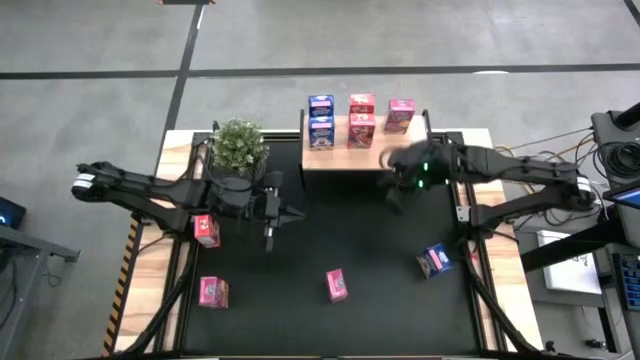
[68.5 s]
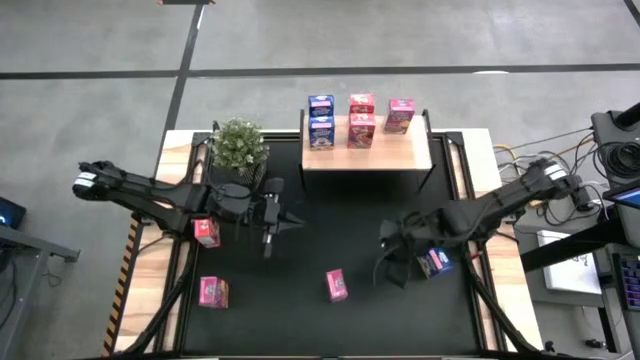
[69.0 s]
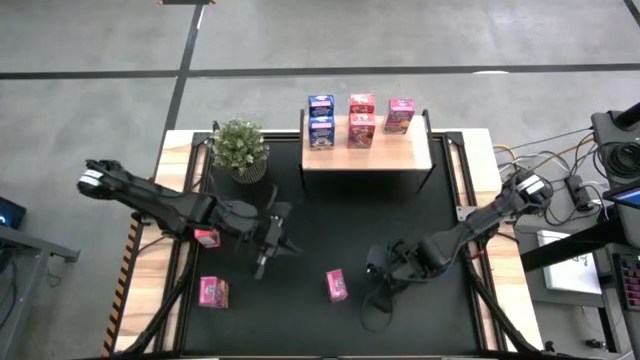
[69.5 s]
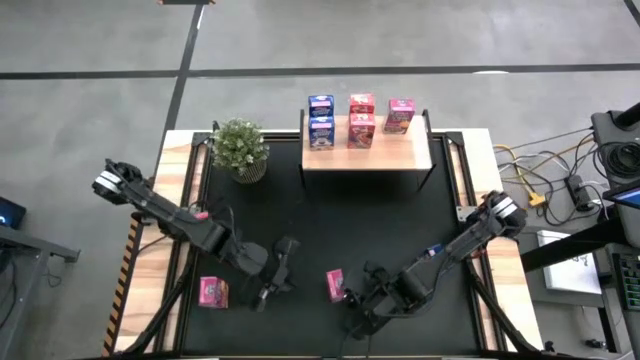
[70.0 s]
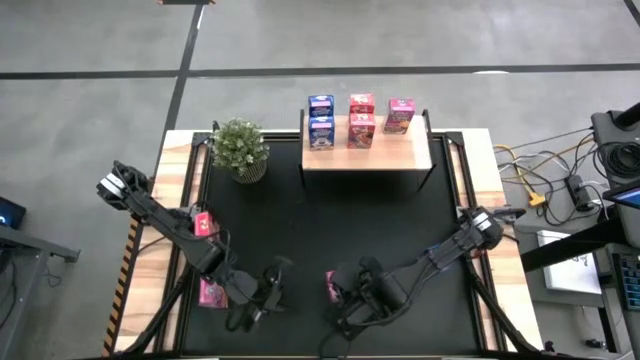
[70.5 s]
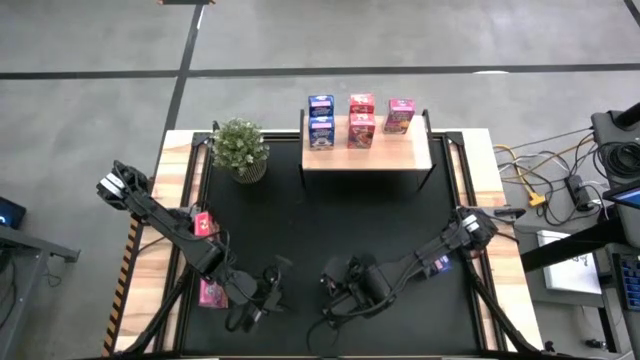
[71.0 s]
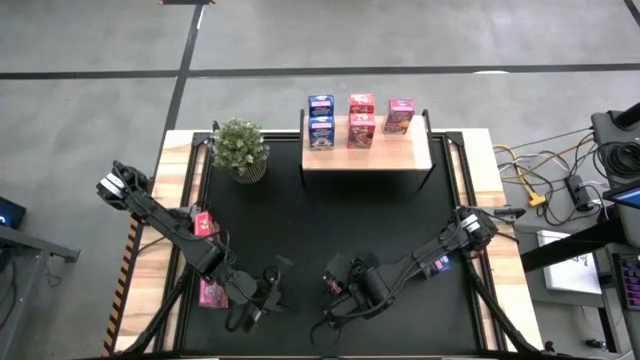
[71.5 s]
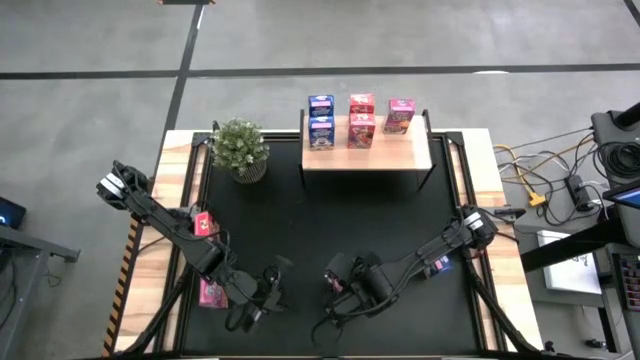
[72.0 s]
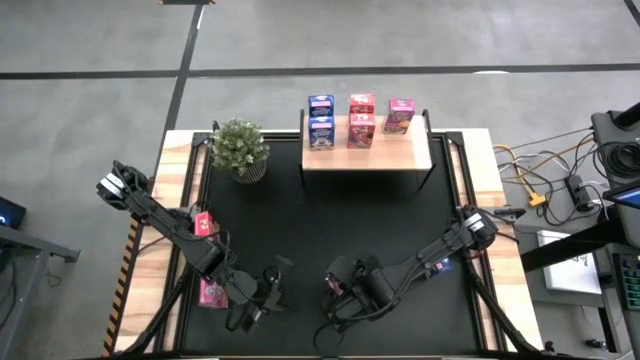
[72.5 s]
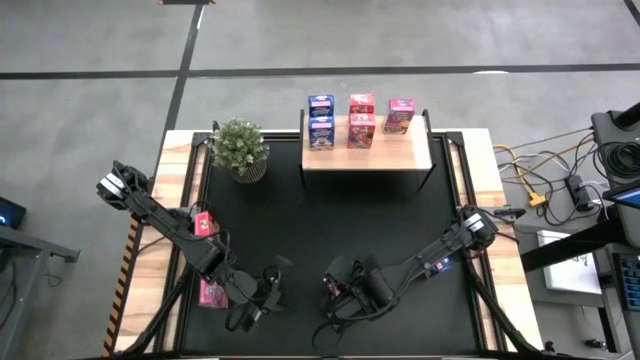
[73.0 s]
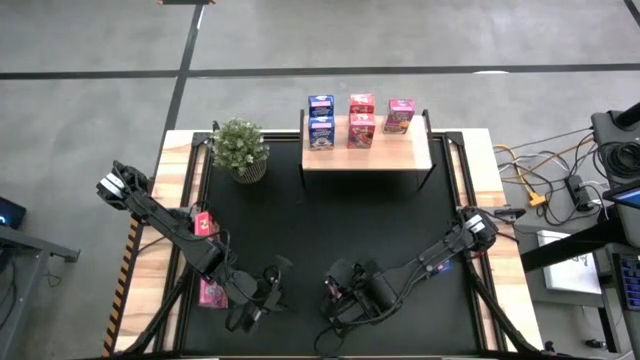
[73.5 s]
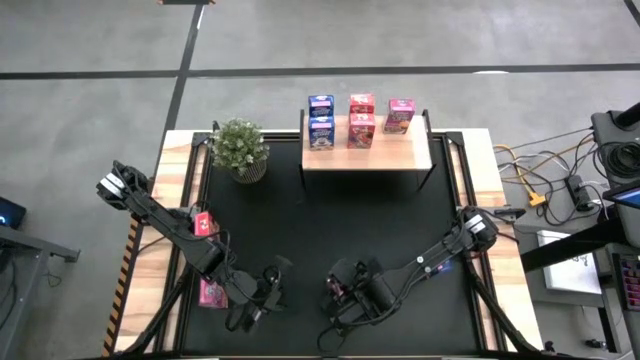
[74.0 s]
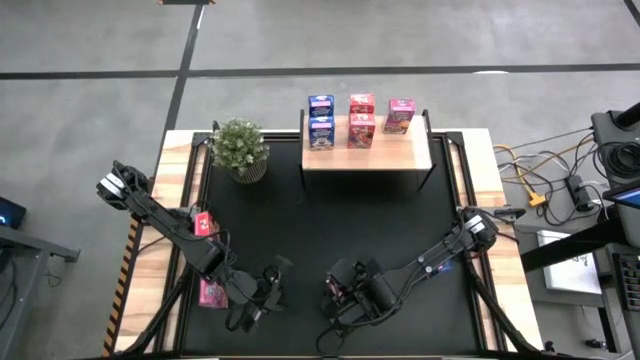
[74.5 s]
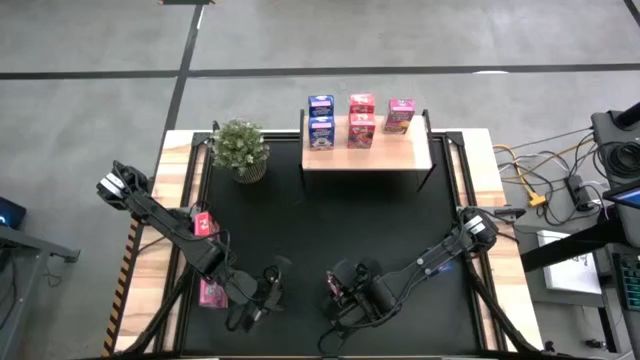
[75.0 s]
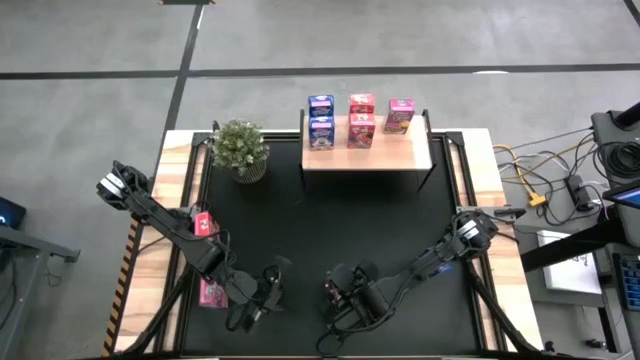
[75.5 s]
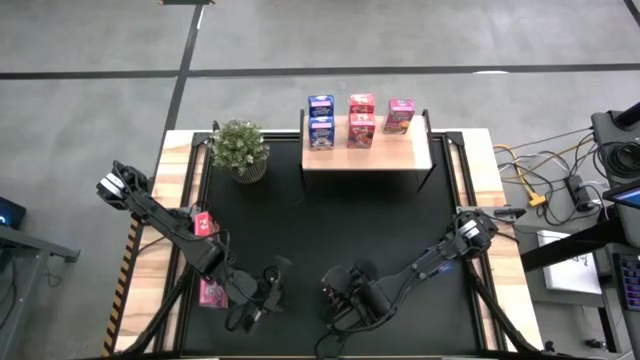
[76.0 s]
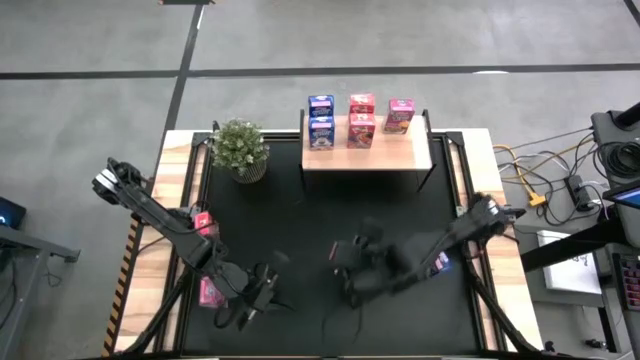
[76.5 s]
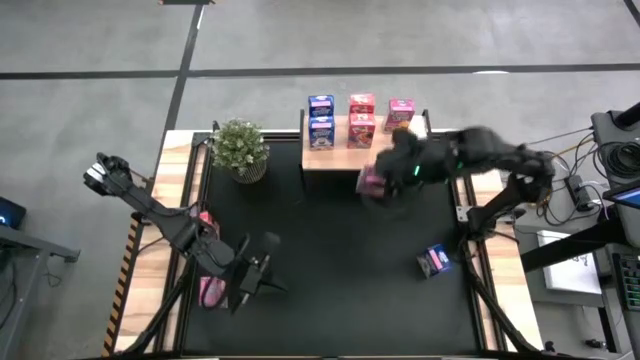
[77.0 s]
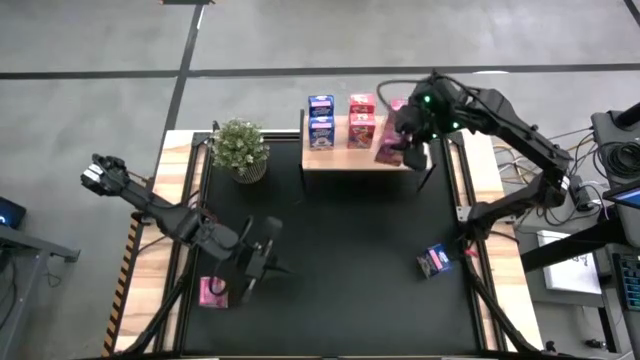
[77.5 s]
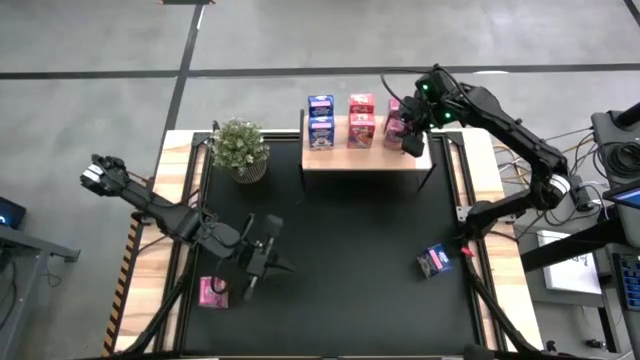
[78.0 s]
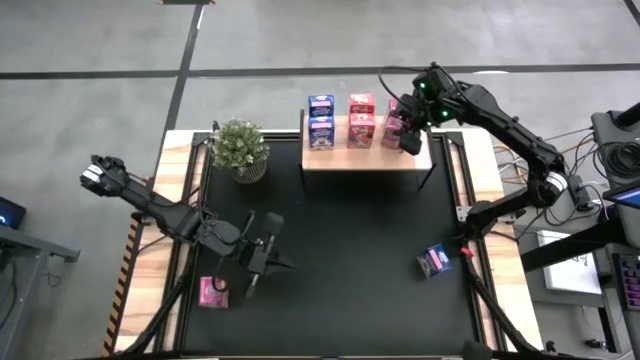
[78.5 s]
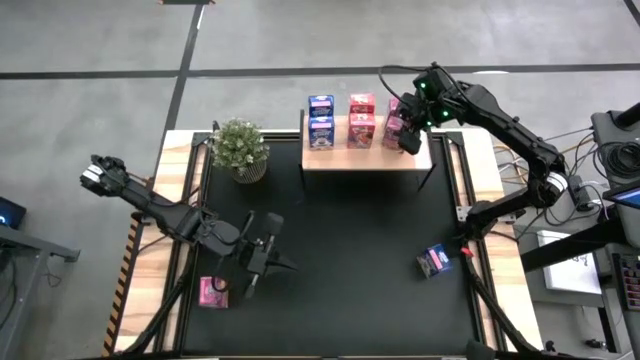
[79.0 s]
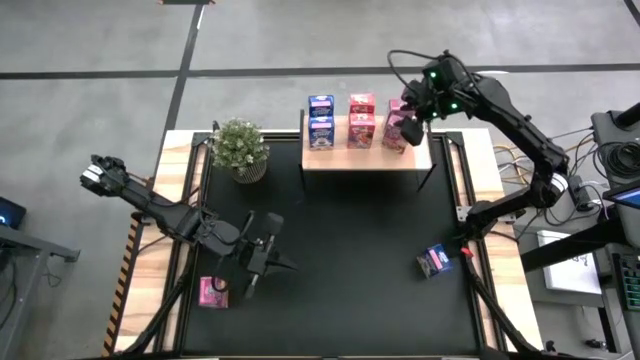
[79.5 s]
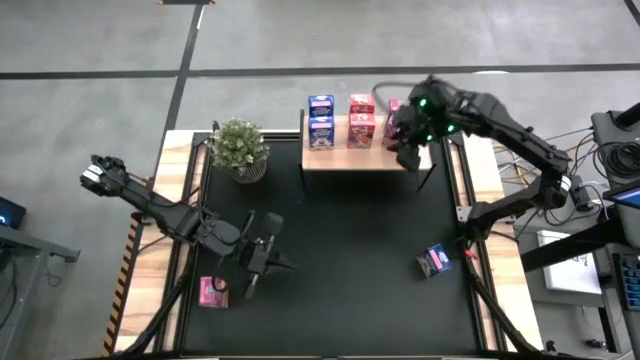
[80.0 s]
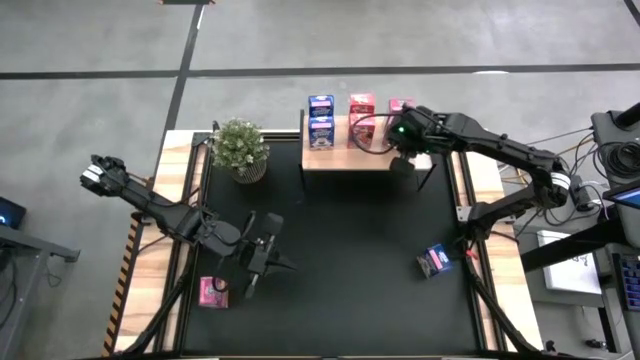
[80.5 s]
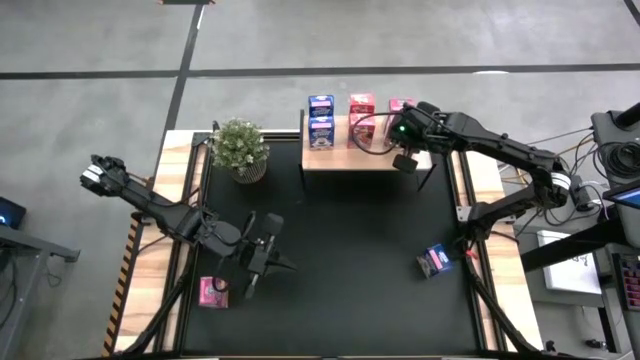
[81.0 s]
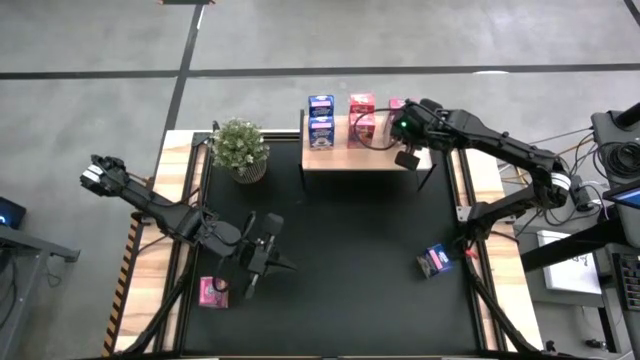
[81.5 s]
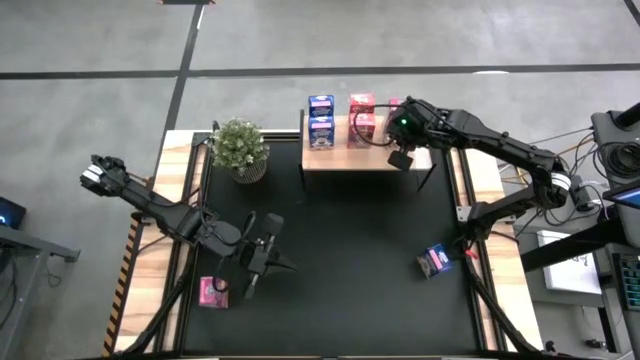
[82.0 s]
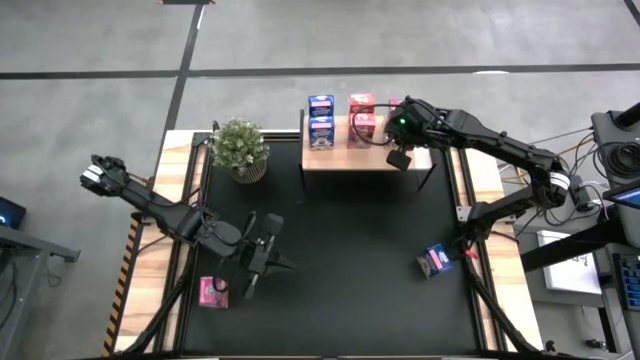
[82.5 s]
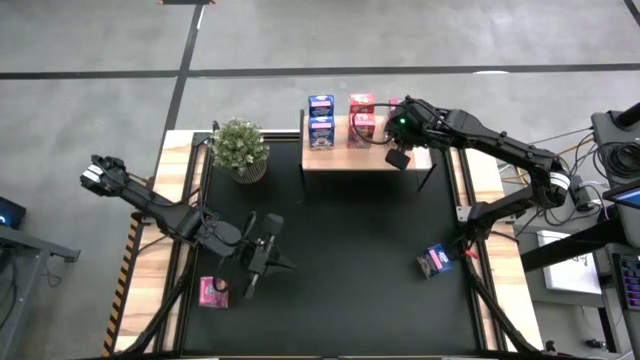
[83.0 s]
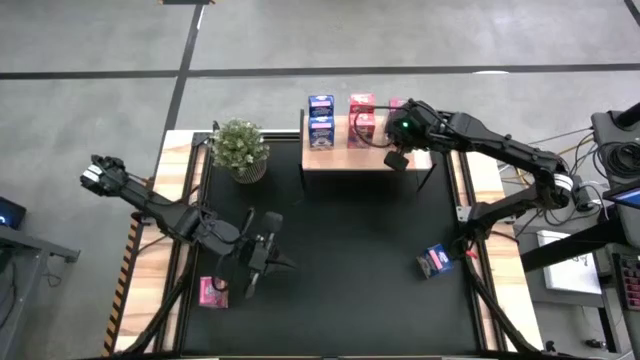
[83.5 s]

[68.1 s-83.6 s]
Task: Stack cereal on shelf
Put the right purple cereal box on the shelf and align it with the other purple cereal box on the shelf

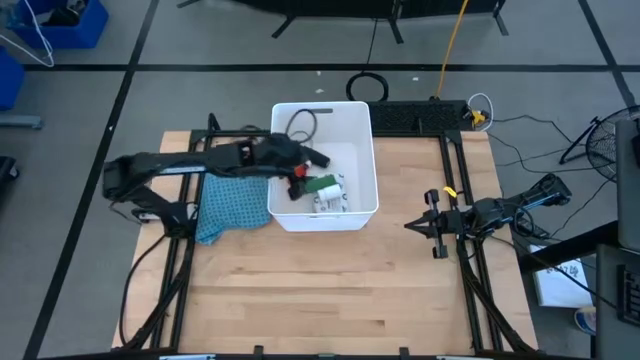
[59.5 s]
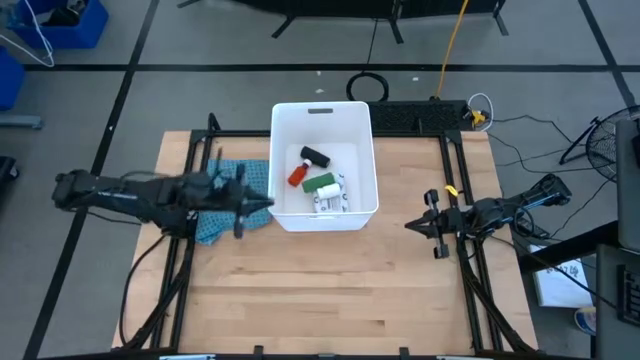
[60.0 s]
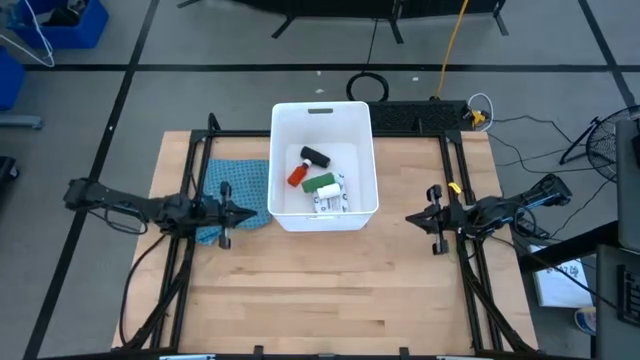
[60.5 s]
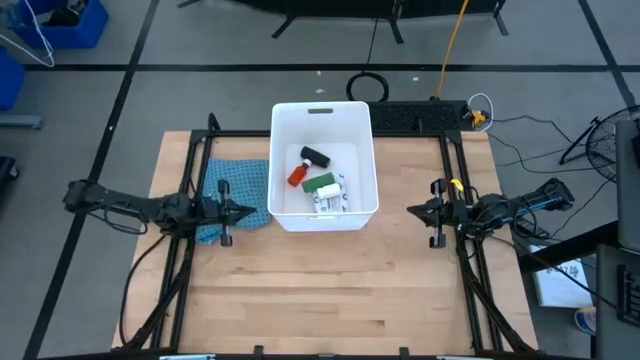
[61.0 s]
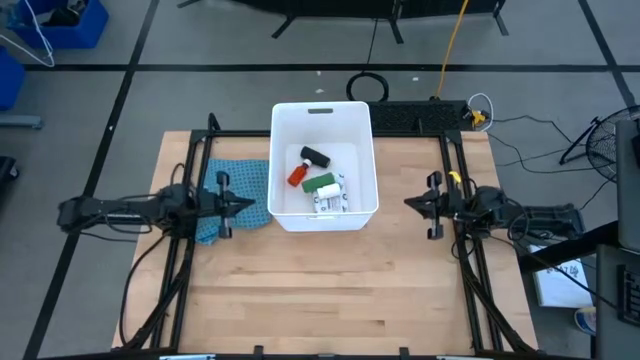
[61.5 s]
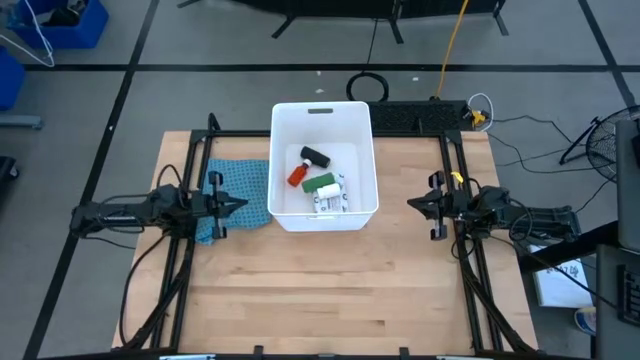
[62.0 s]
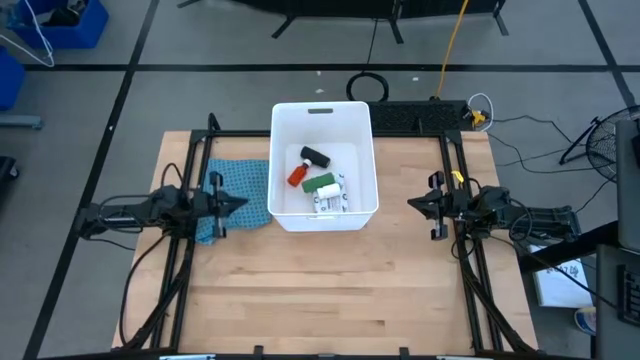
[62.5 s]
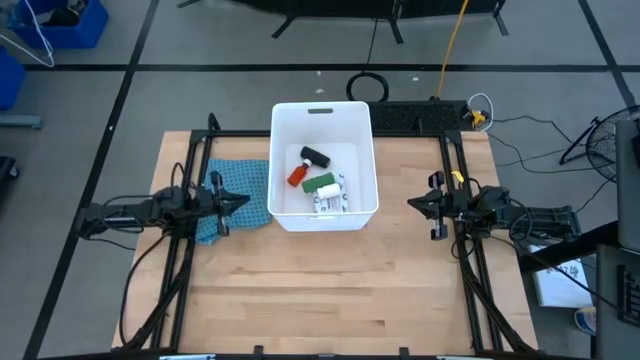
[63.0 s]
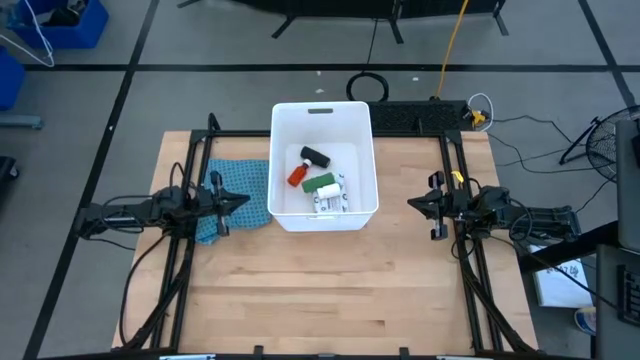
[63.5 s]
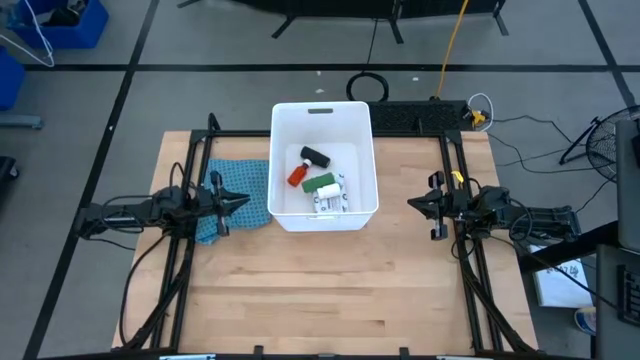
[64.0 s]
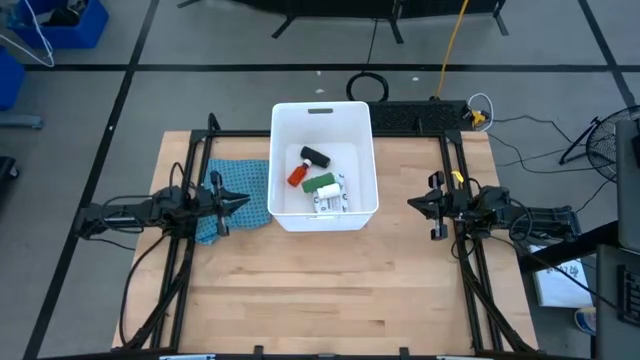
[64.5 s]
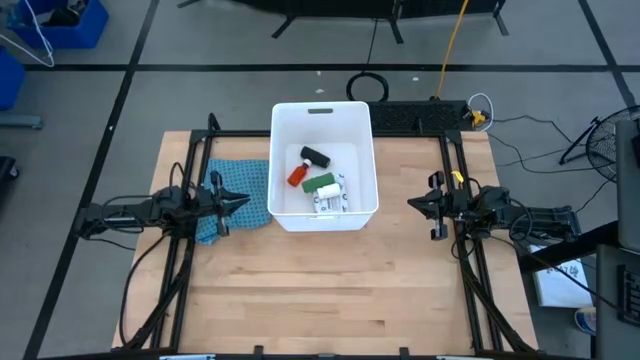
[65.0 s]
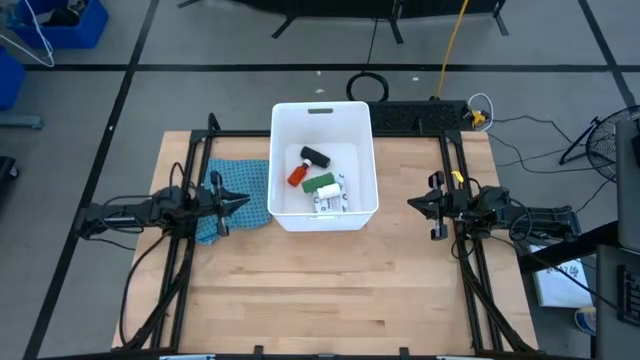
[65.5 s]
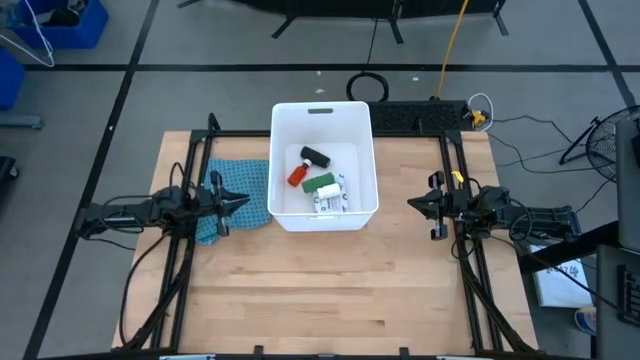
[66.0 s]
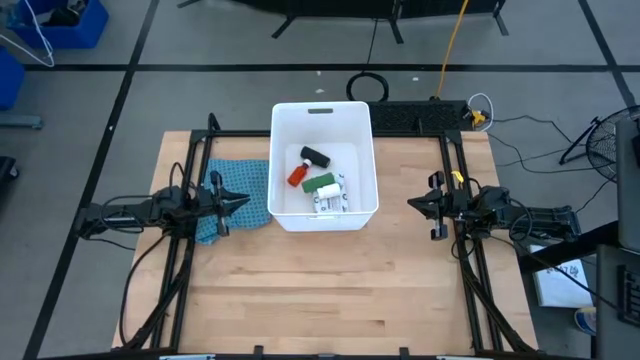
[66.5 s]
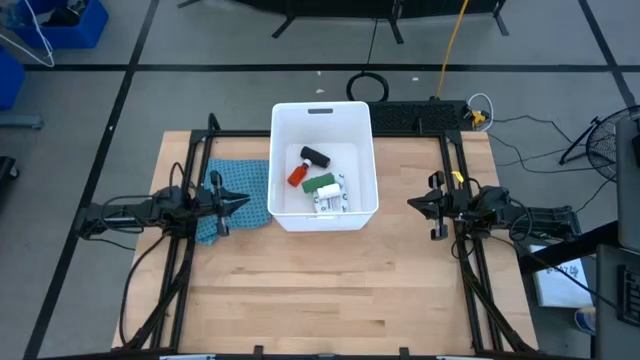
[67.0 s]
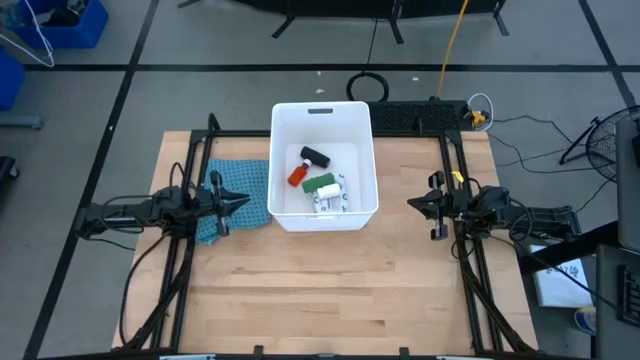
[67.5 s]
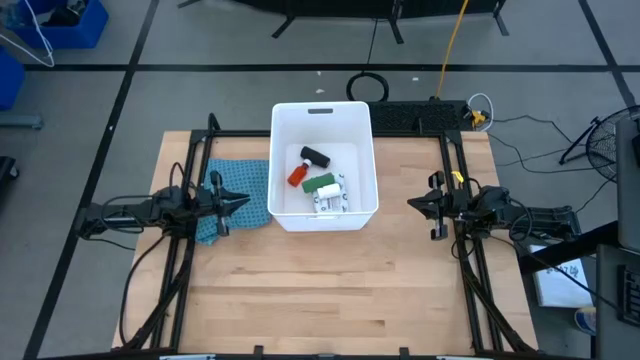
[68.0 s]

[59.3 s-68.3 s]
Task: Pick & place medical supplies in basket/bin
Return to Home Position
